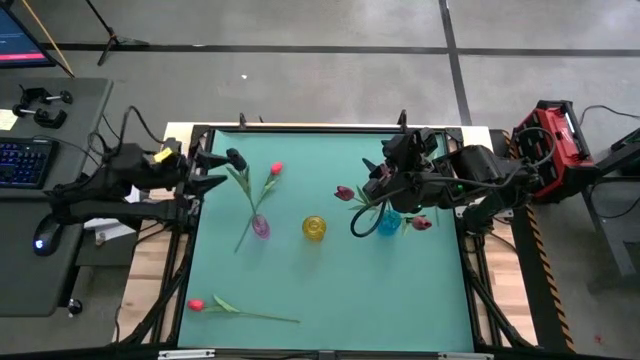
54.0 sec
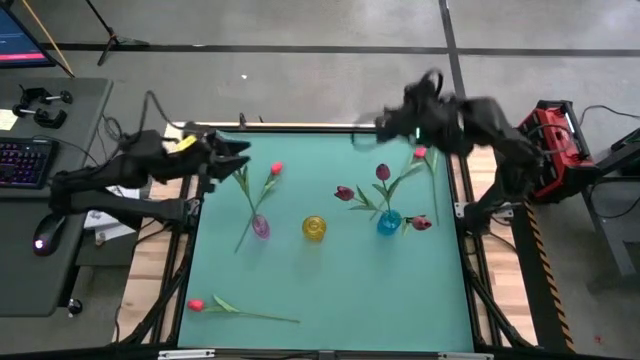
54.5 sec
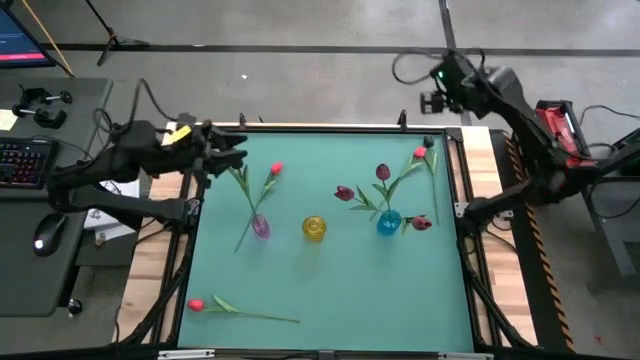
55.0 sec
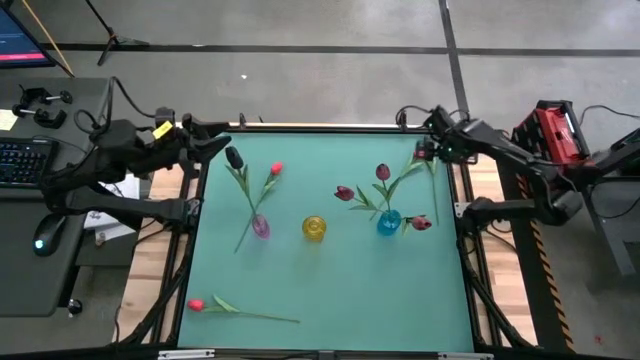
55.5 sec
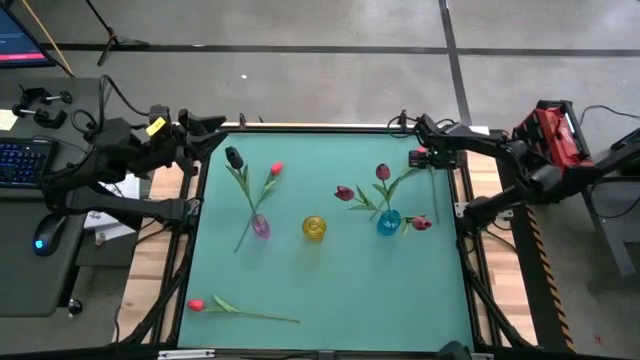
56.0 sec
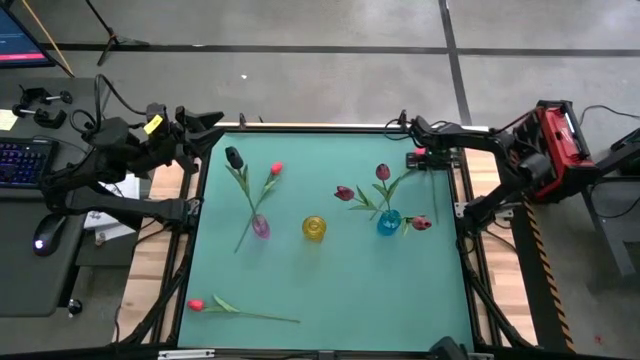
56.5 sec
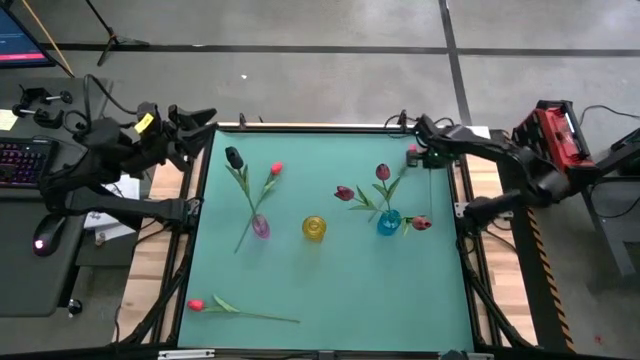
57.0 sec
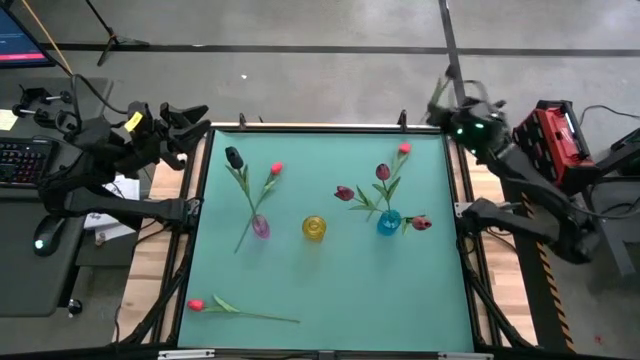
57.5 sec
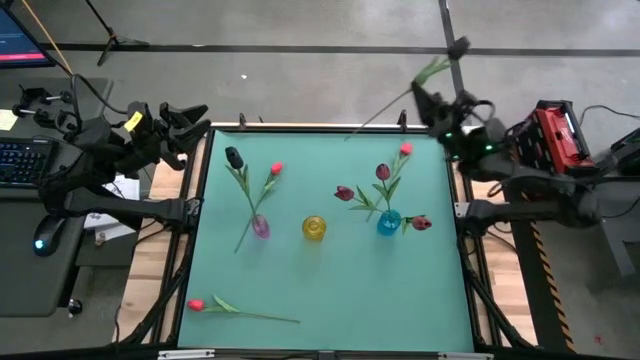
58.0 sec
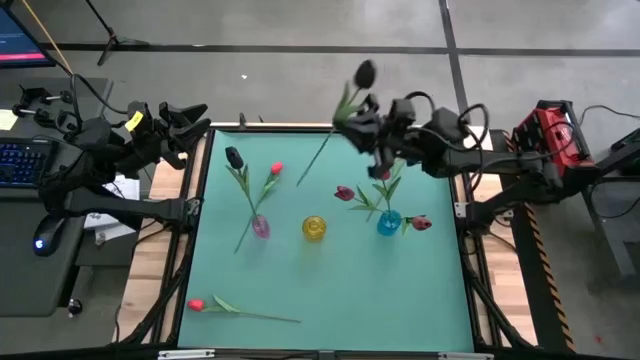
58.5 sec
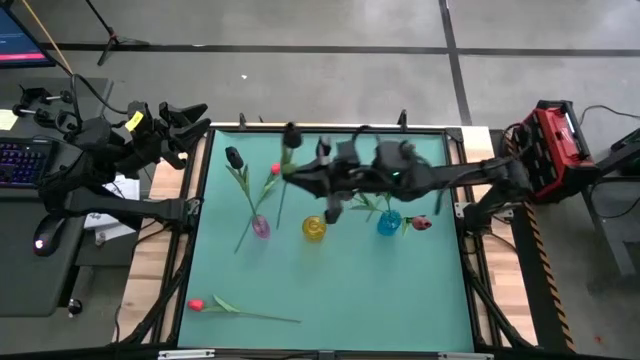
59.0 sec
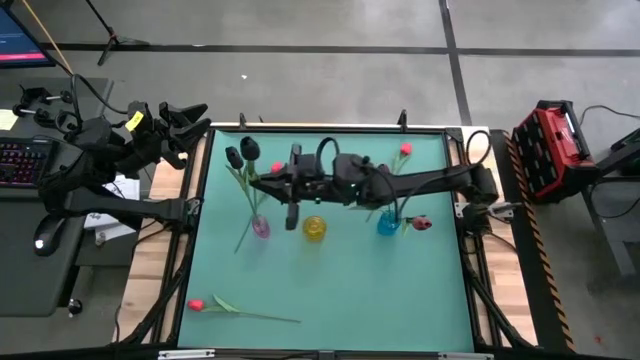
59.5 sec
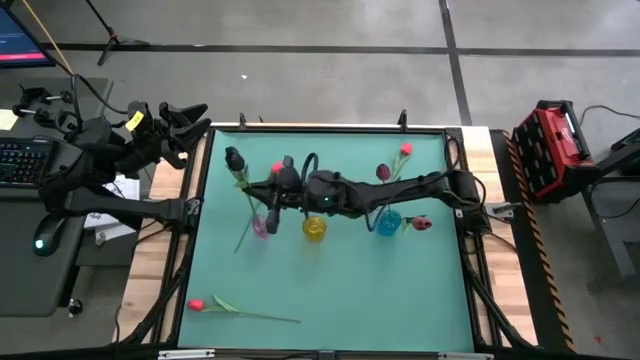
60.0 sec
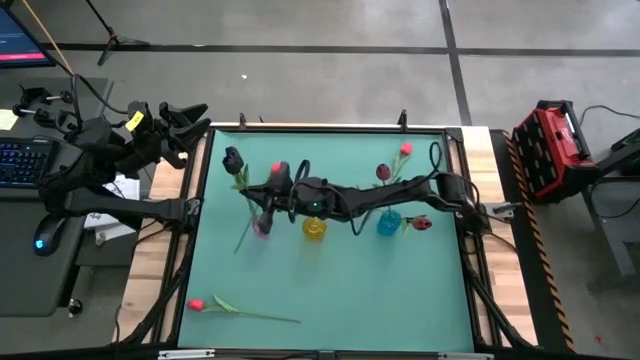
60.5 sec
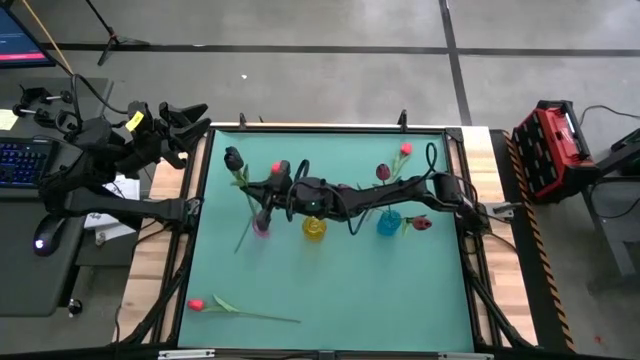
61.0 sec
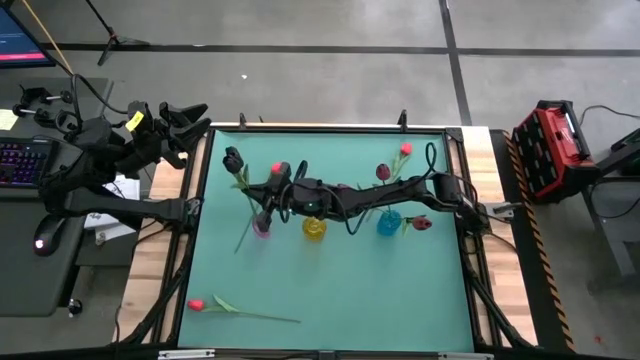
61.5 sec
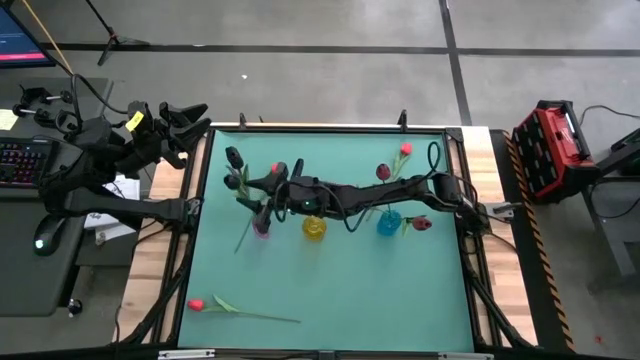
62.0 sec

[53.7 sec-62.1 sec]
Task: Sort flowers into vase by color
Put the black flower into the purple vase

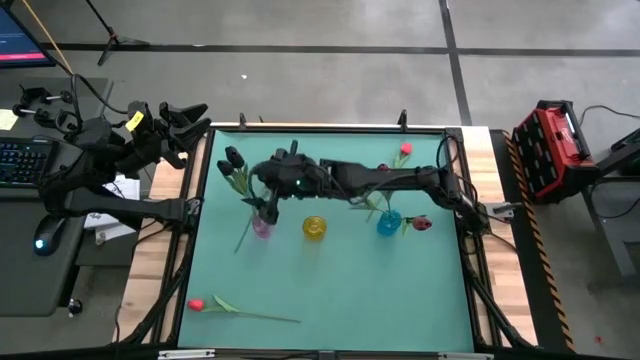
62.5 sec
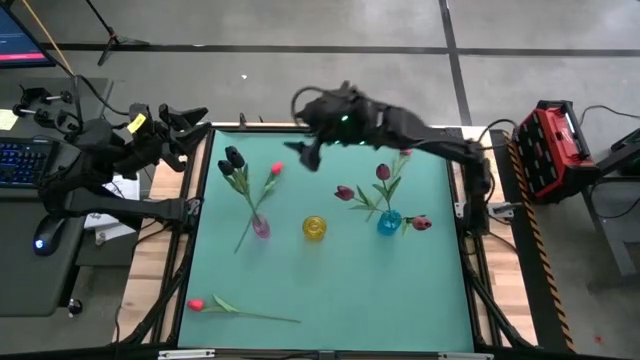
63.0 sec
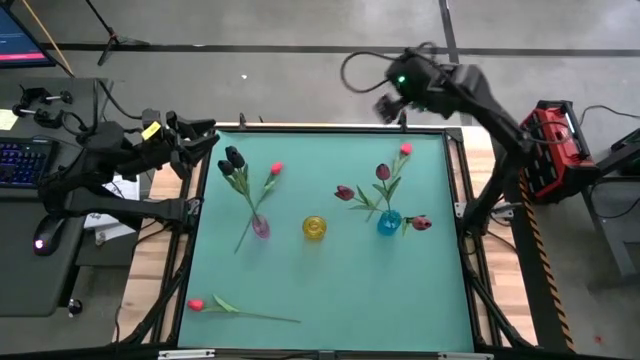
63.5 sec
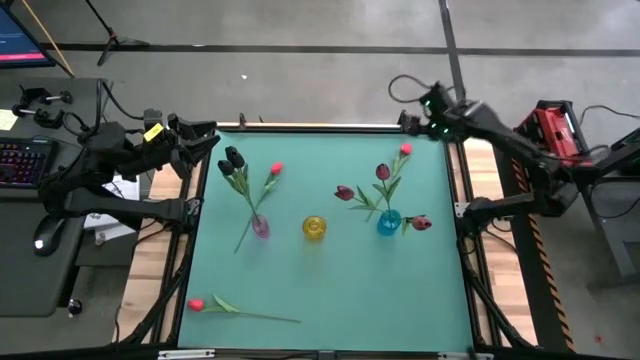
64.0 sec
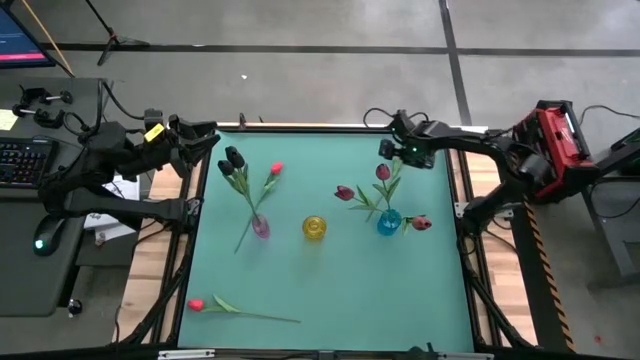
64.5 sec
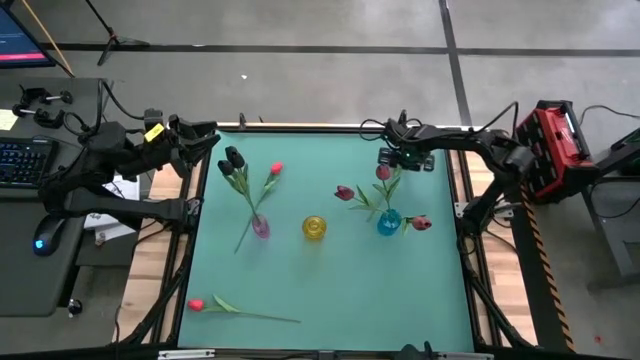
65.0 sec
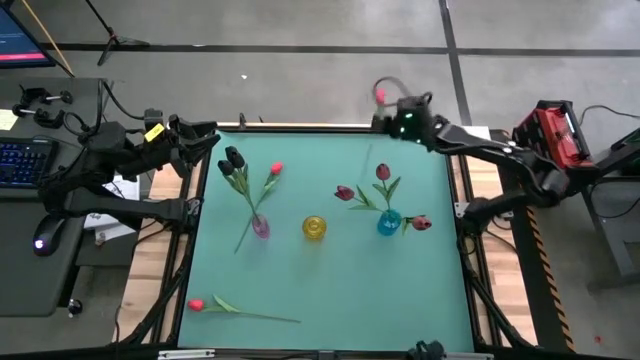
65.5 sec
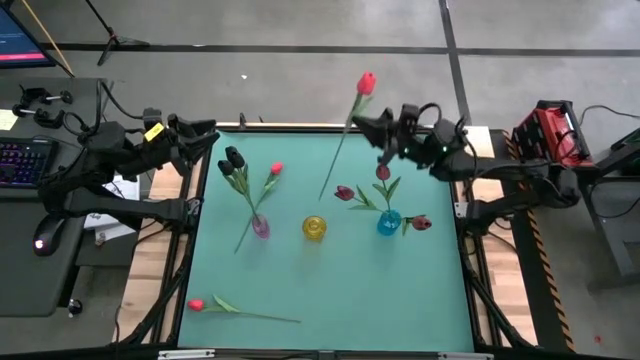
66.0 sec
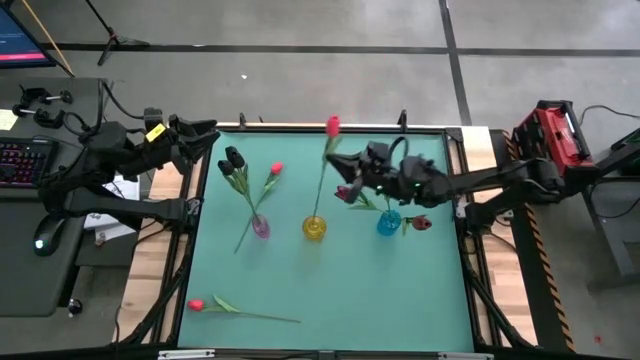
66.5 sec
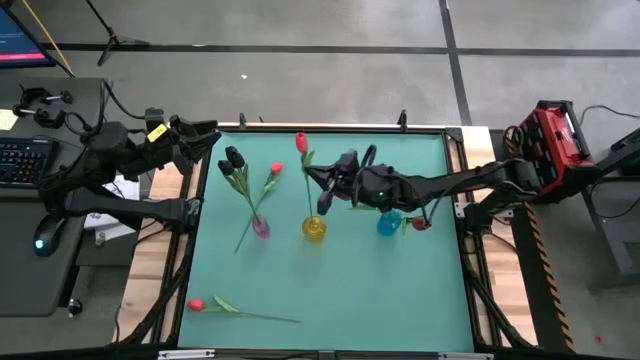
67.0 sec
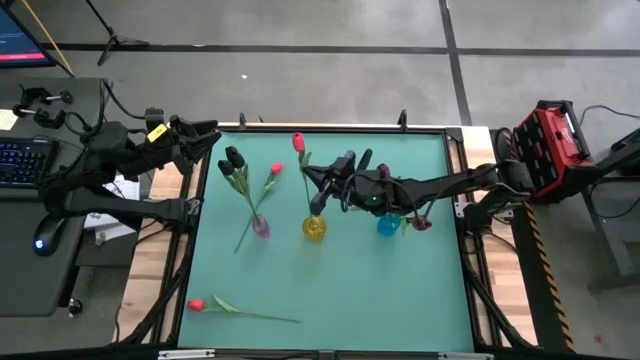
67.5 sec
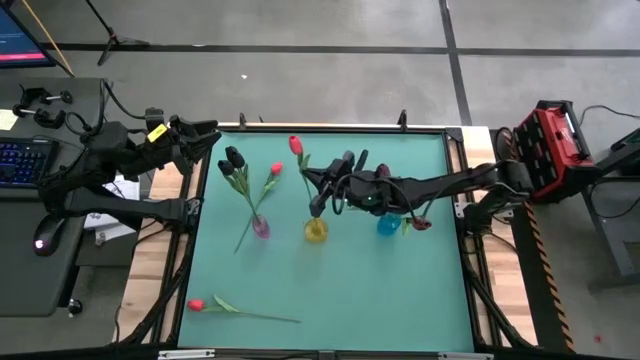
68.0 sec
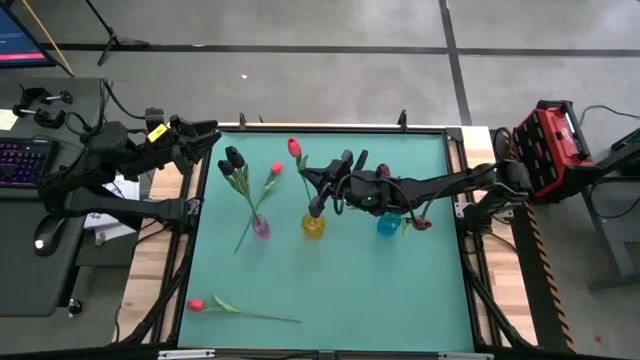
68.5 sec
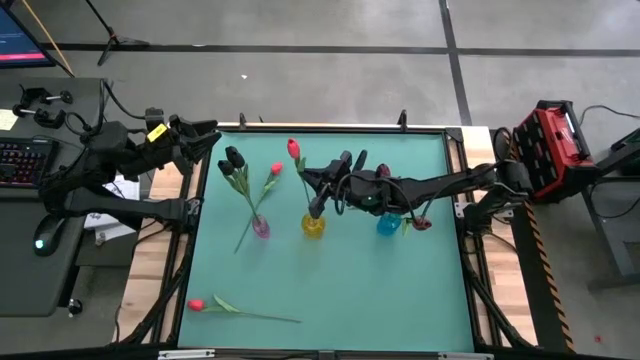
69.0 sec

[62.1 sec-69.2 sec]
Put the top right pink flower into the yellow vase

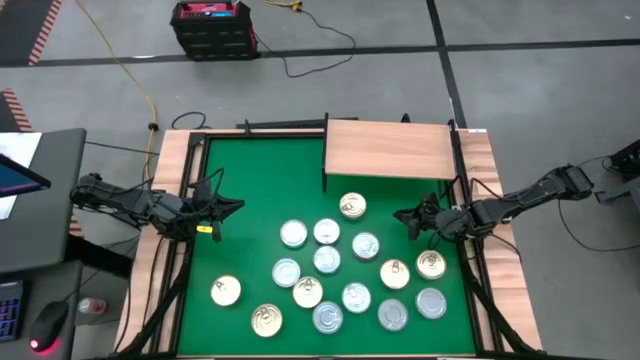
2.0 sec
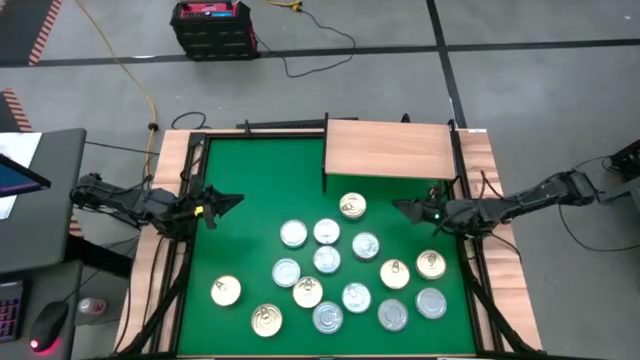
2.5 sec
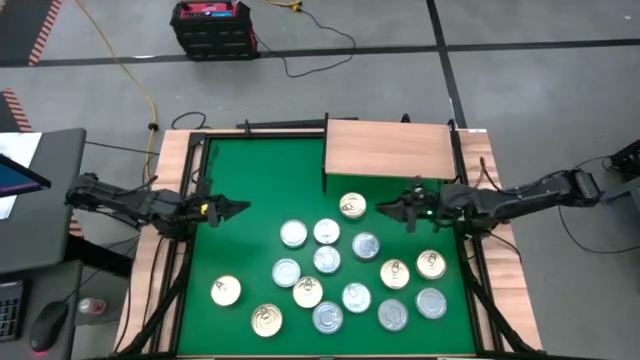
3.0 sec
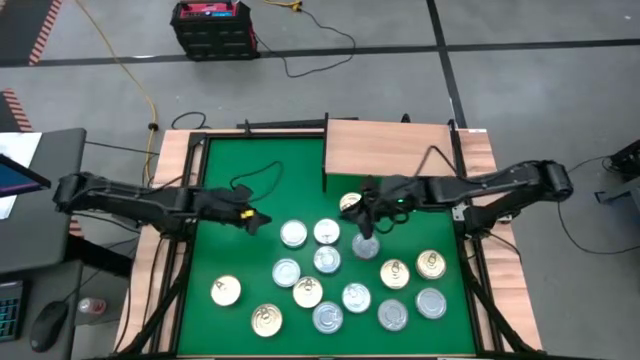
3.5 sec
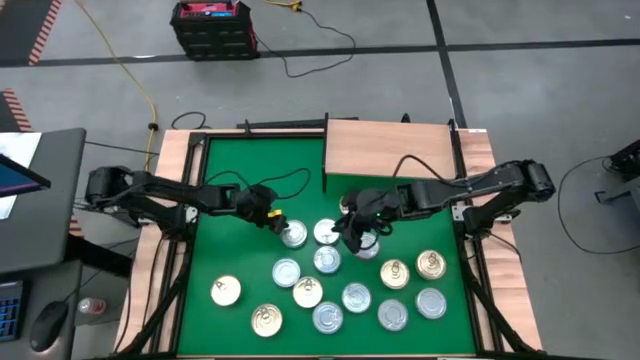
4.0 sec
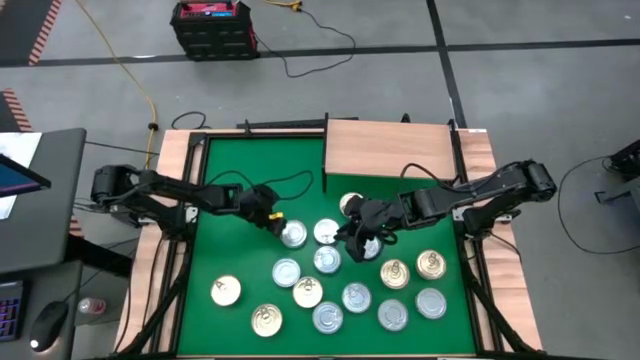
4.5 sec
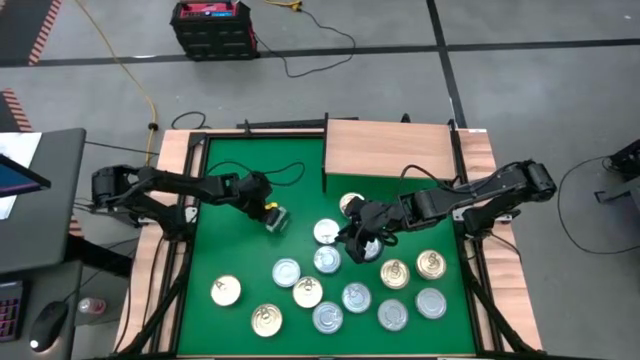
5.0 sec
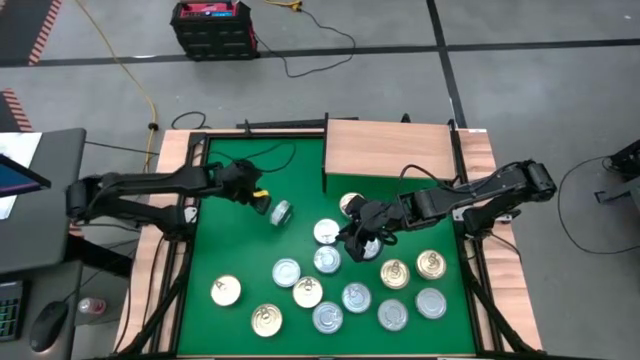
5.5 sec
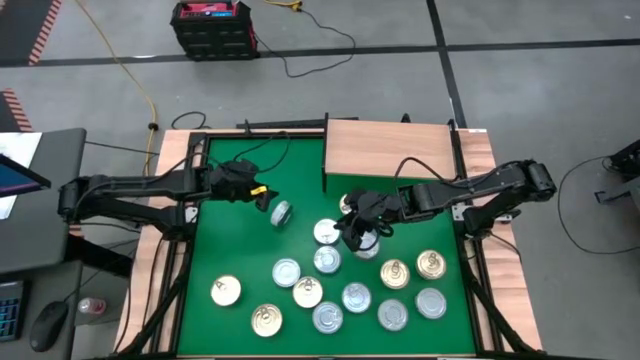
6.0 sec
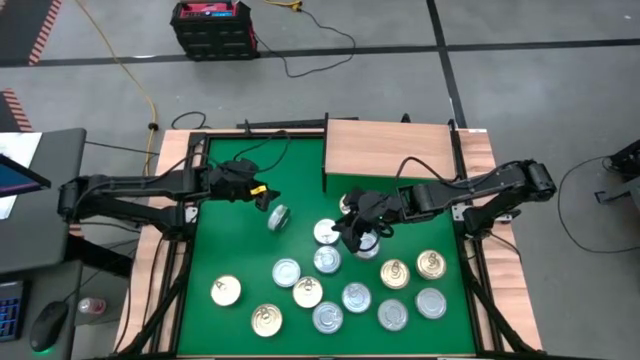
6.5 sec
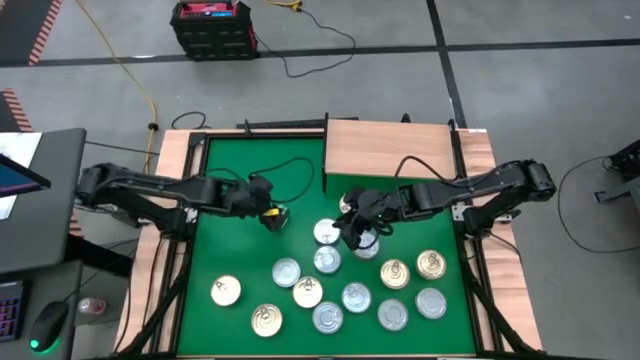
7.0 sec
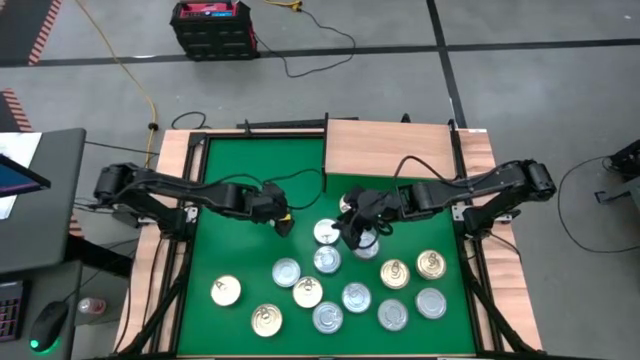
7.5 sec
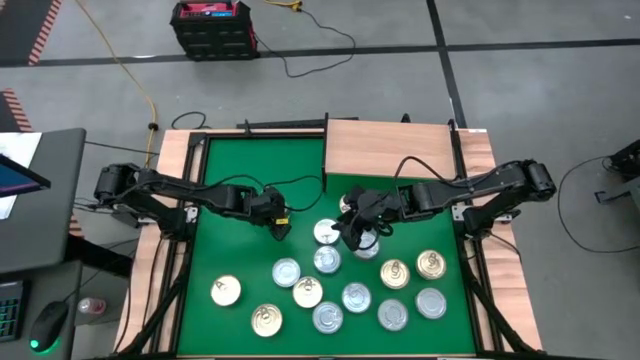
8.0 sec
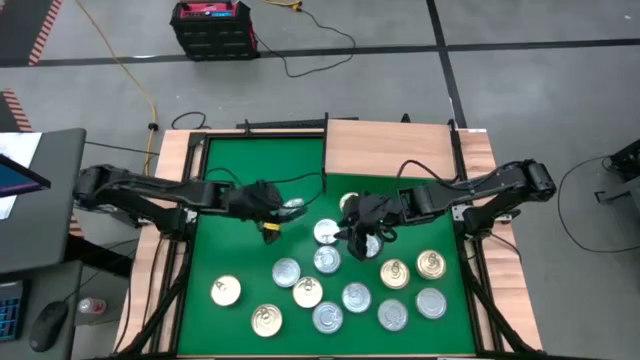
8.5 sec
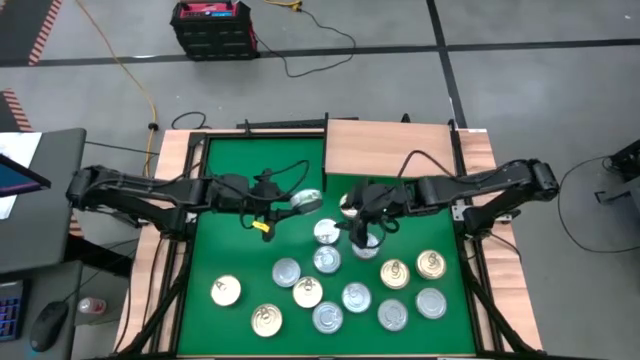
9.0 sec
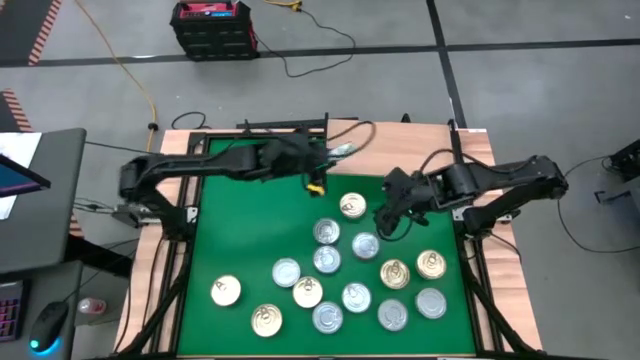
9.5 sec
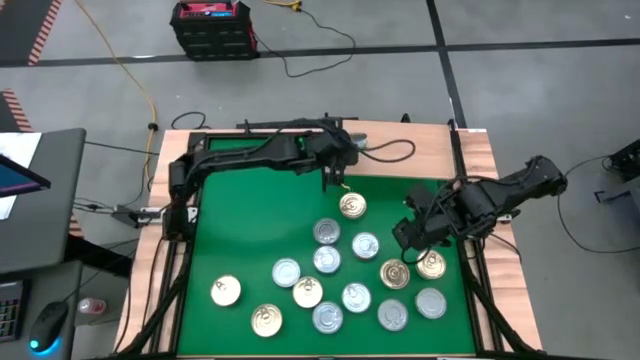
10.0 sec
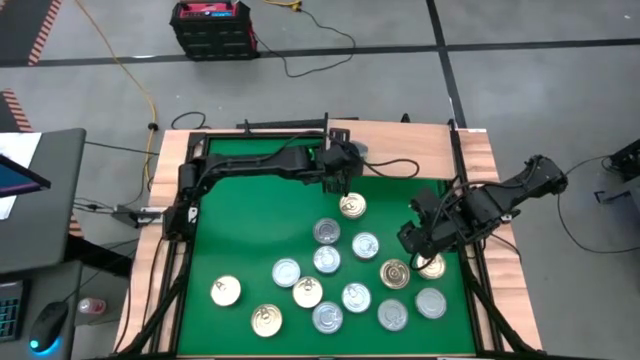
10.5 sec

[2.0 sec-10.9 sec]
Task: Stack canned seafood by type on shelf
Put the green with white tuna can on the shelf
